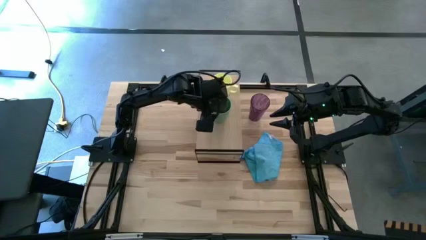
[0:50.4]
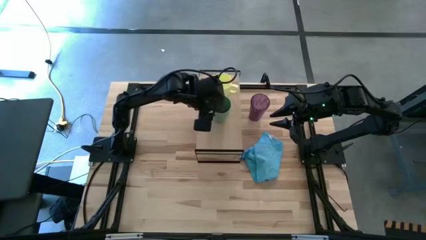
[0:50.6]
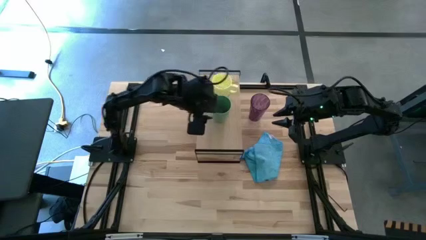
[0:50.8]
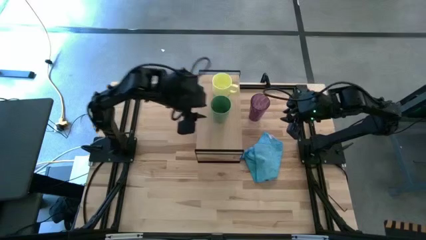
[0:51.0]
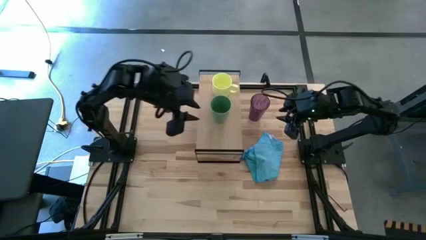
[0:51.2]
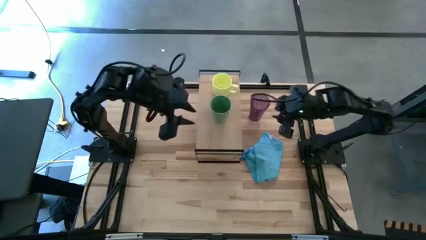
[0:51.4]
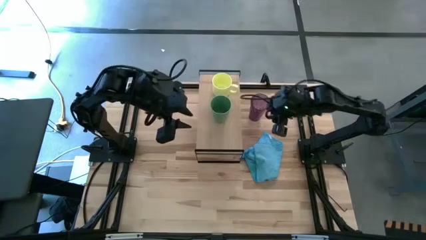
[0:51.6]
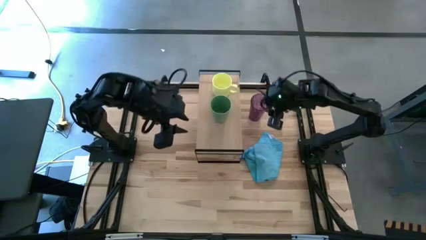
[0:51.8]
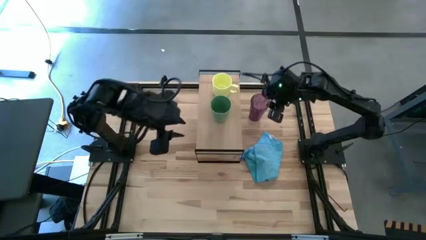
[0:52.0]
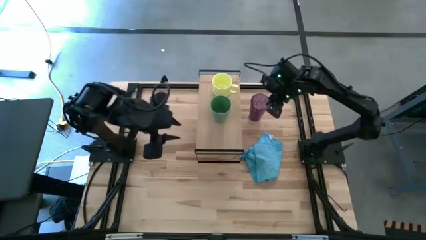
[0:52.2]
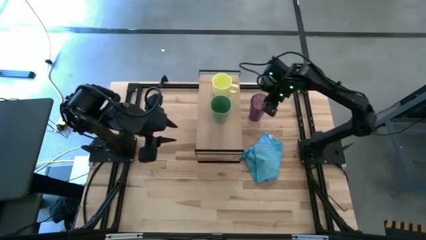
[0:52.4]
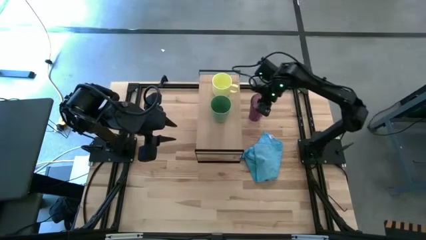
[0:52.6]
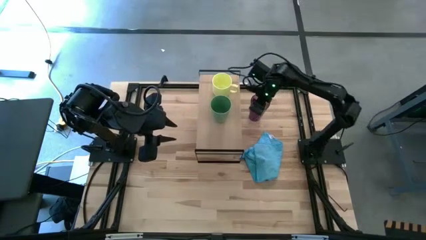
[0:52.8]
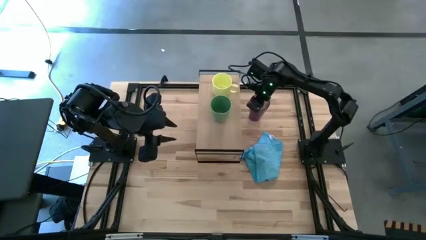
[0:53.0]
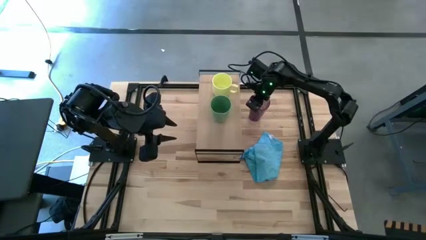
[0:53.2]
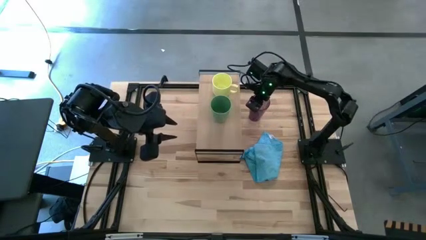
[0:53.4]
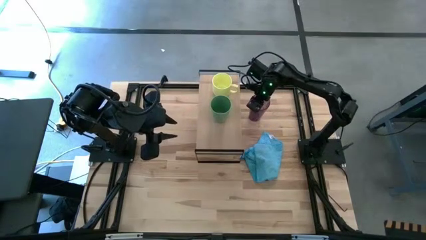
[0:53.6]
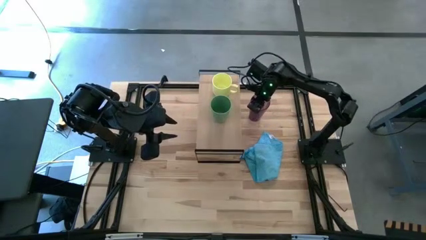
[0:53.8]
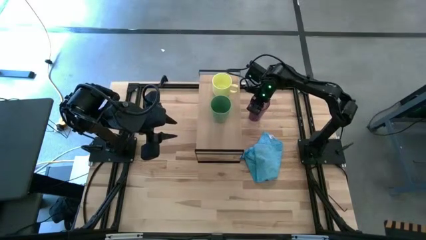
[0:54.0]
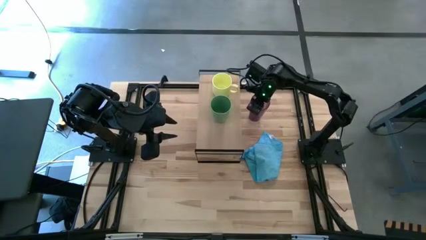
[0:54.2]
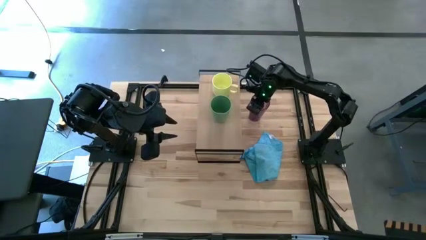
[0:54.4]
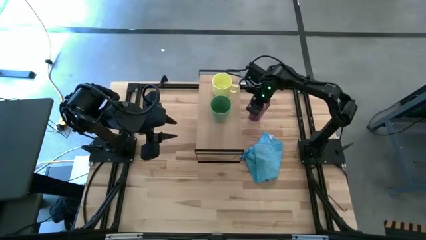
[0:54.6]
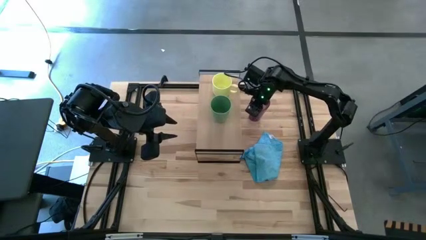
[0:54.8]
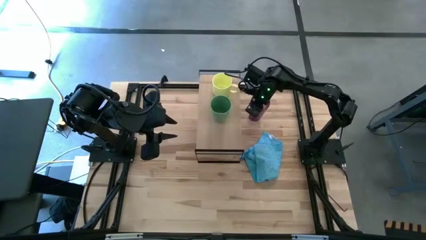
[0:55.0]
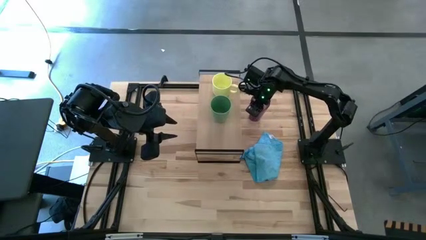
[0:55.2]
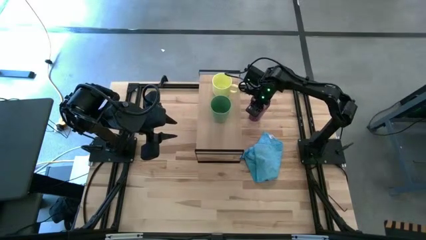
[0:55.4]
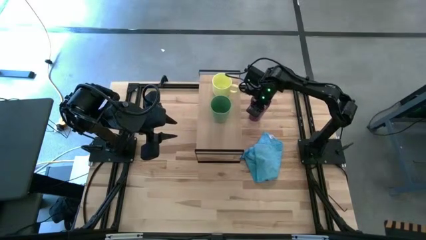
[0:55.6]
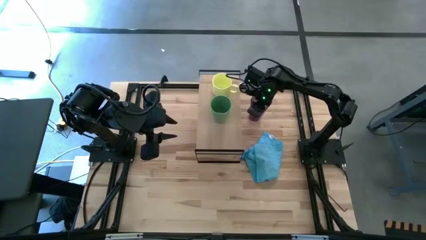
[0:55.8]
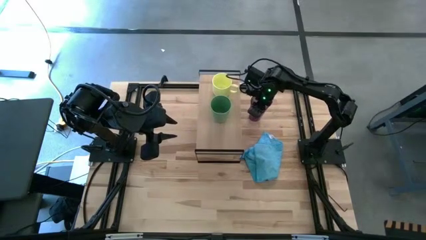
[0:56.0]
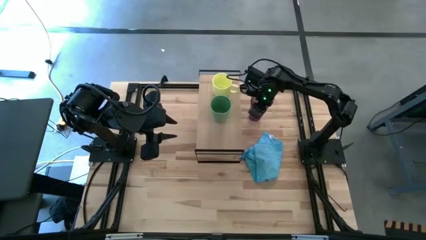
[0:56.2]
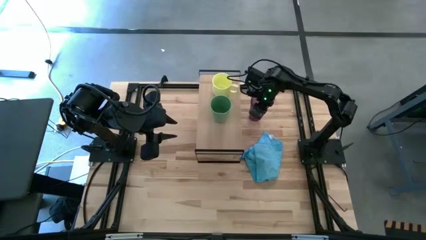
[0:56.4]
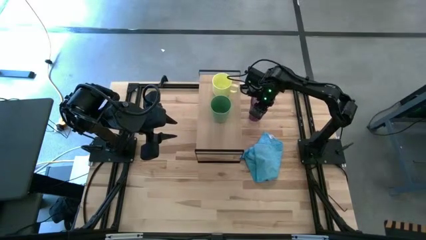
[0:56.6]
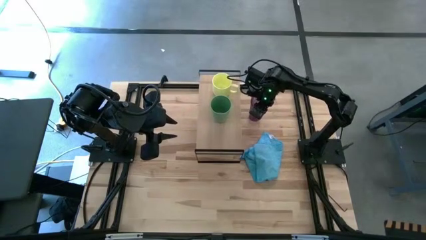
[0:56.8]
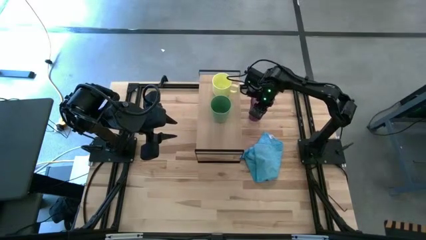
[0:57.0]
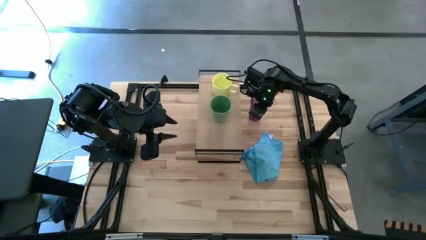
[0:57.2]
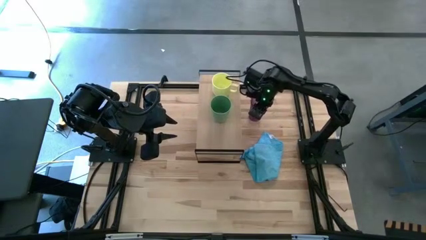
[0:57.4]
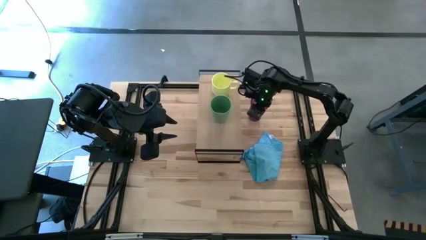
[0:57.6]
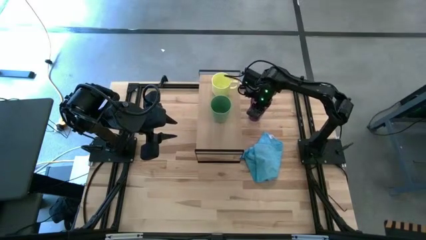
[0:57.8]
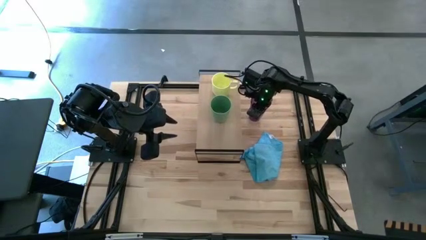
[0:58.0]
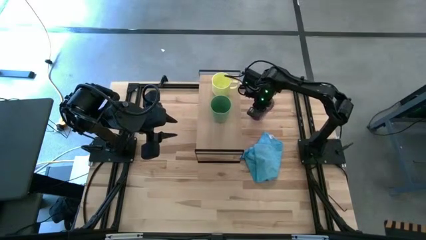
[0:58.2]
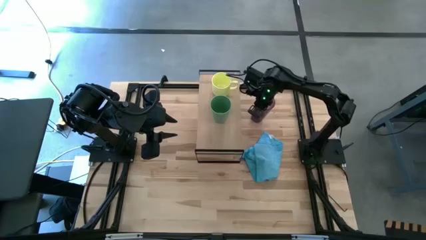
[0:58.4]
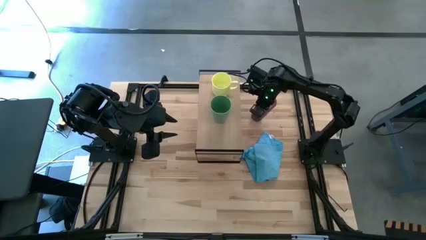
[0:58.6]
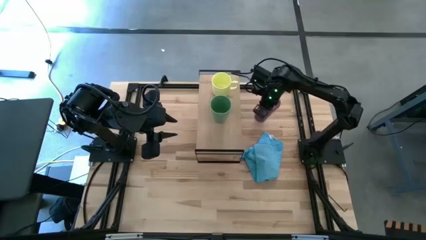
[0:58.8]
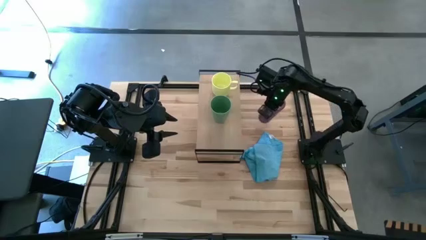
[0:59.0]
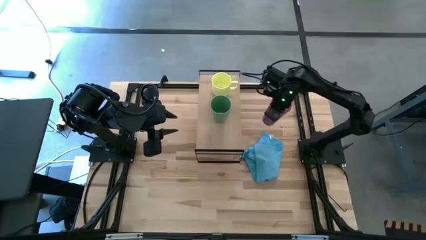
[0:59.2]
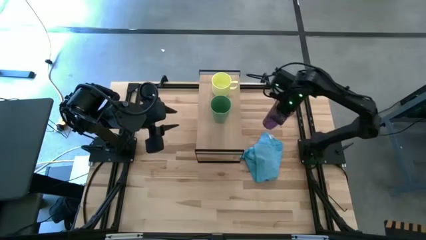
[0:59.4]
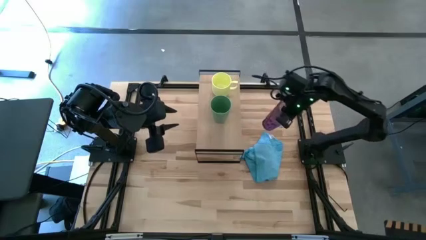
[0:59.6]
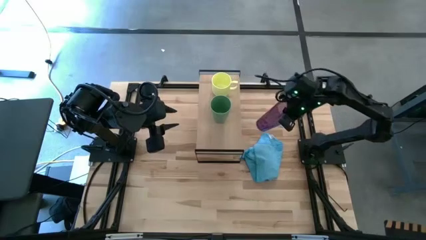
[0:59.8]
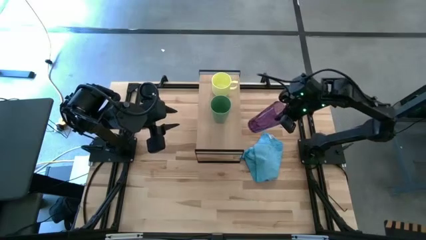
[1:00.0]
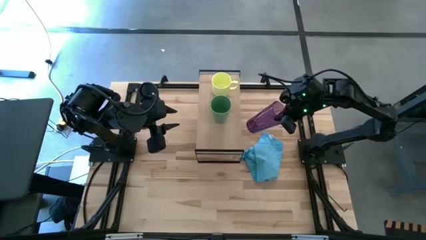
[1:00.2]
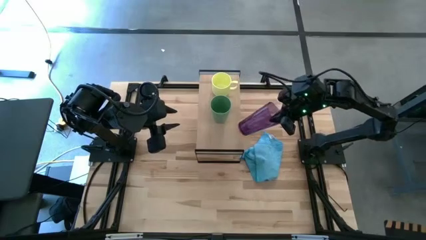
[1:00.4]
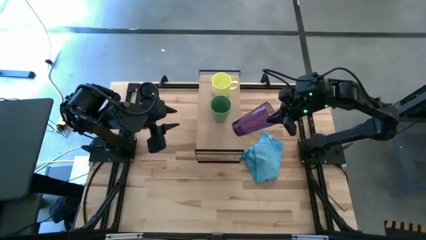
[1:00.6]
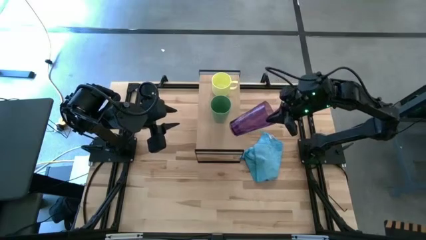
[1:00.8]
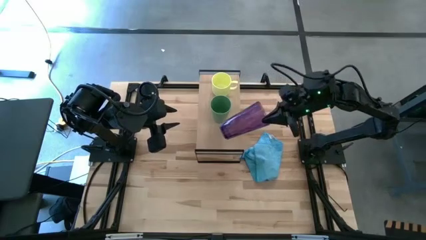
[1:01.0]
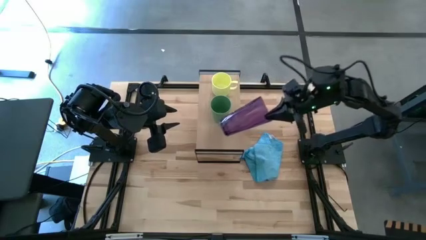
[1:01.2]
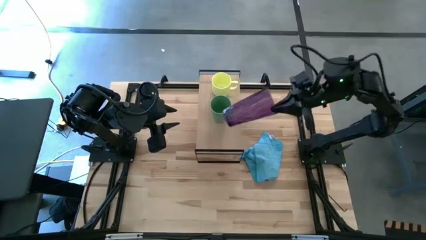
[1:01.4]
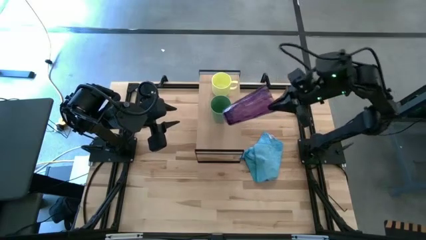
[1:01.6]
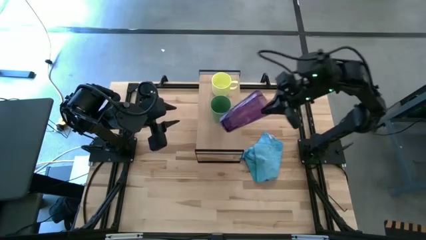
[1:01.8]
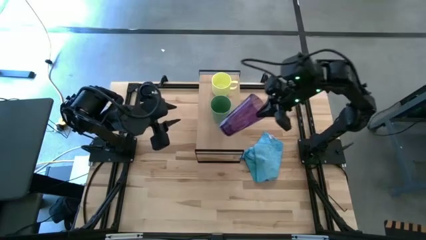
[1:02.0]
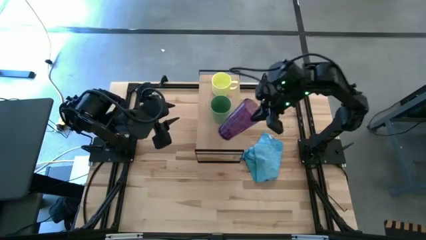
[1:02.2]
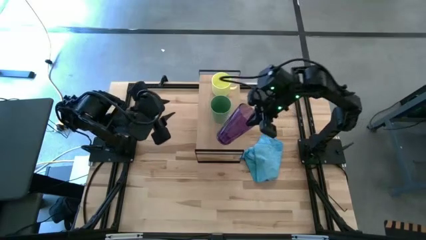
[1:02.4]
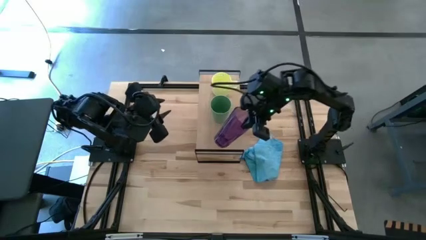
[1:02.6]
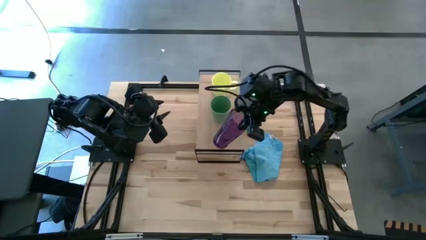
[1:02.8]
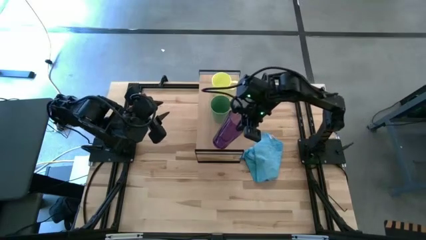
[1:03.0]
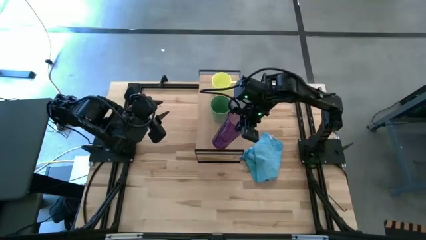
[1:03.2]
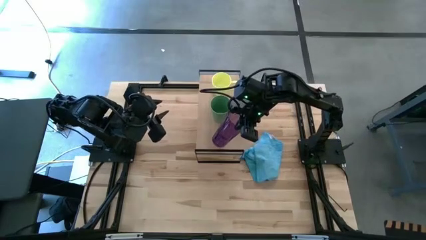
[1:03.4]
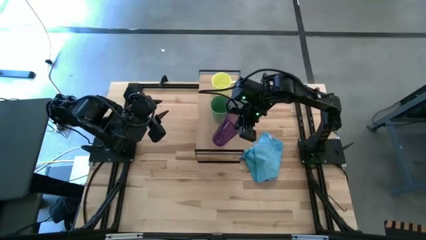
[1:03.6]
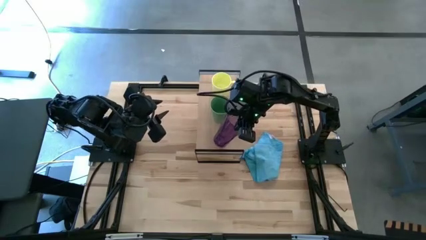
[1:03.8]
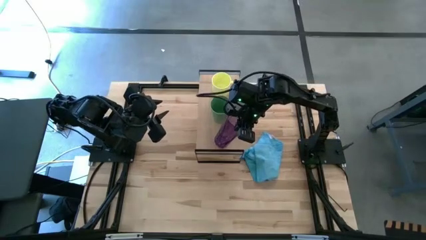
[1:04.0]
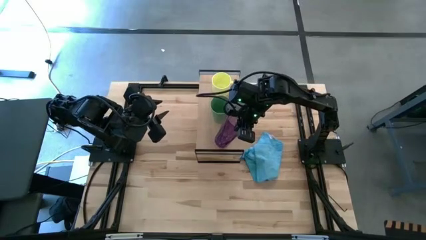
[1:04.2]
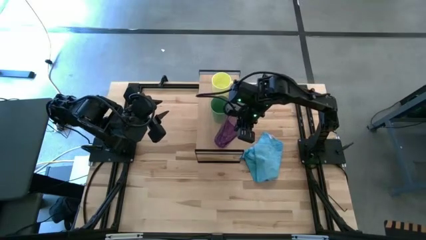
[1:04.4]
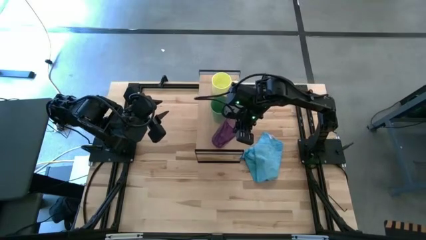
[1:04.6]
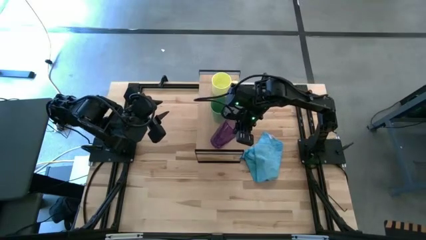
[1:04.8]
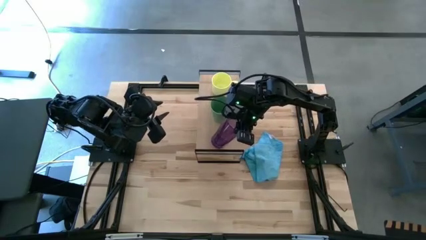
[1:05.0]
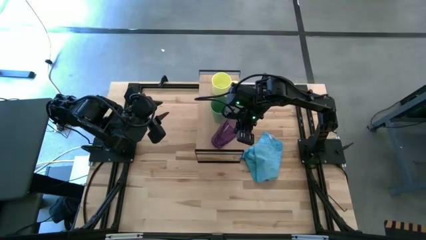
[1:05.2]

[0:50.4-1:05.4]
Task: Stack small to large cups/mugs on shelf
Put the purple glass on the shelf

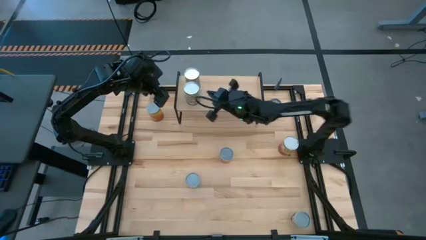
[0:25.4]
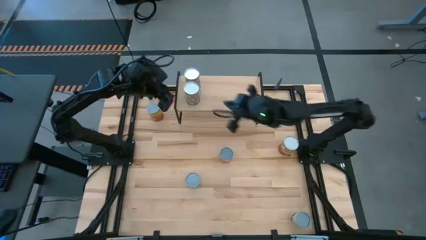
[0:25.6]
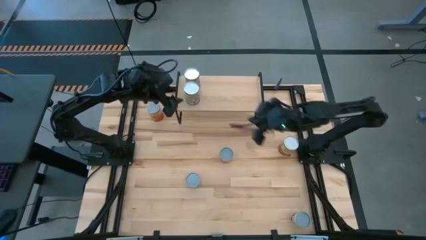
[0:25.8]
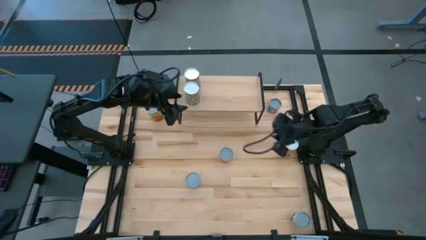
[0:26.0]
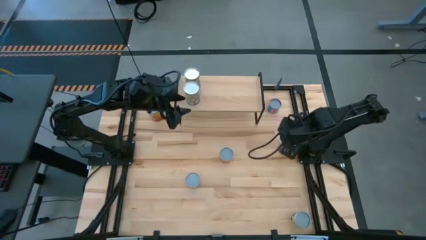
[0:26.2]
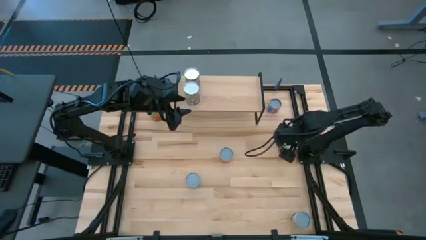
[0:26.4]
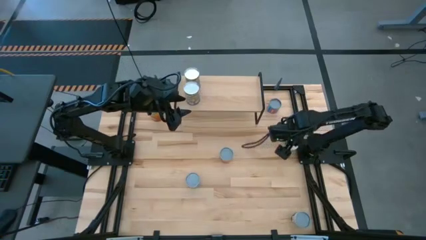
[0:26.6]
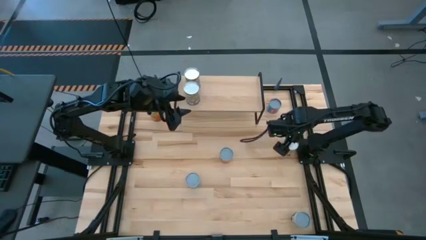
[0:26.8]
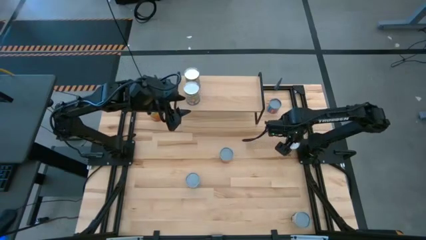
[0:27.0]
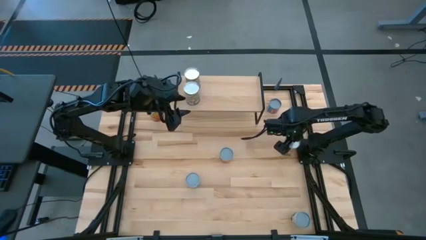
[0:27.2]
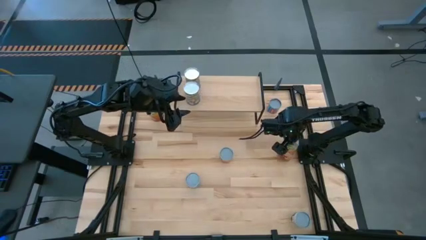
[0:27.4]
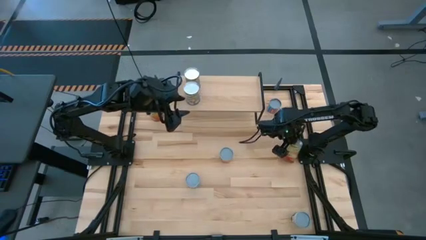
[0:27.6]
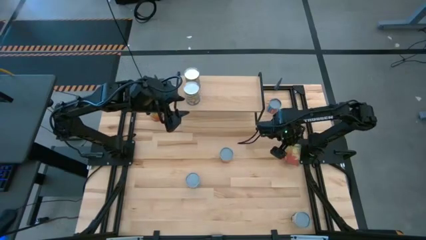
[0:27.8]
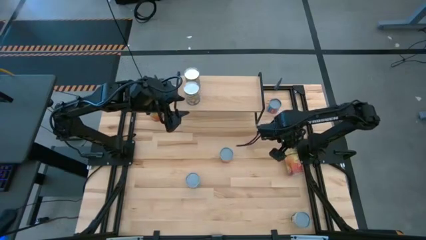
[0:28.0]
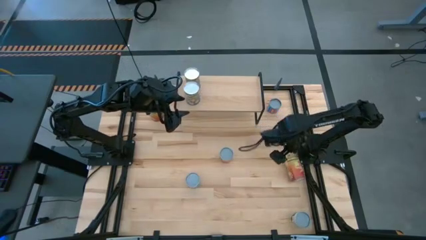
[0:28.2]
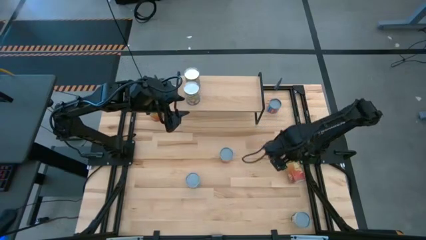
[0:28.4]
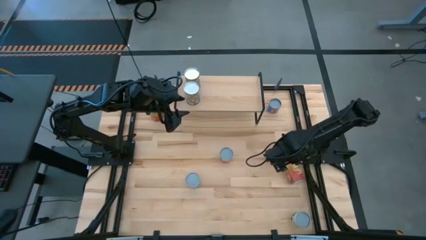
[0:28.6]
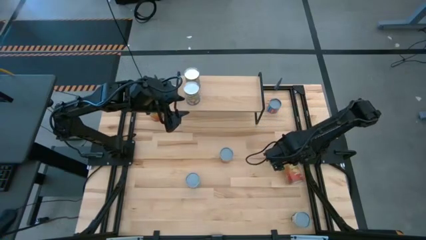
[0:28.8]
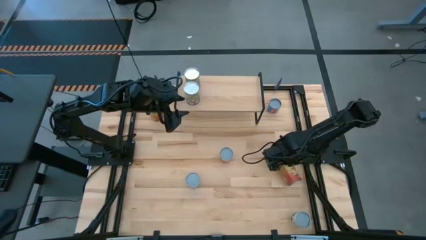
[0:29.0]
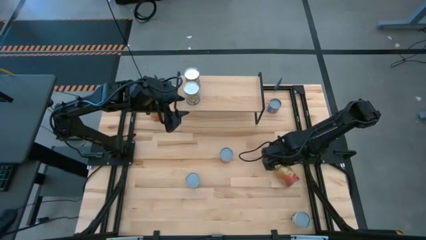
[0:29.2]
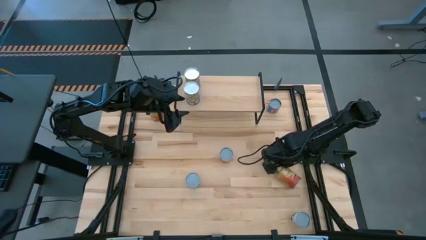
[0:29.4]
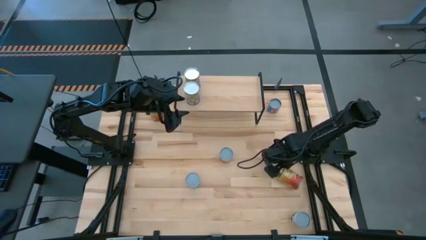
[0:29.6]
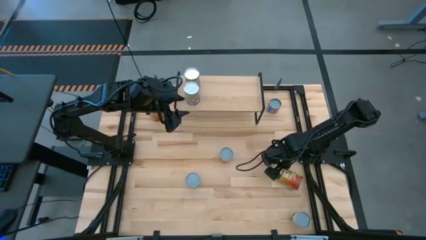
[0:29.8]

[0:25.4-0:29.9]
Task: Pick and place cans onto a shelf
Put the bottom canned corn on the shelf
